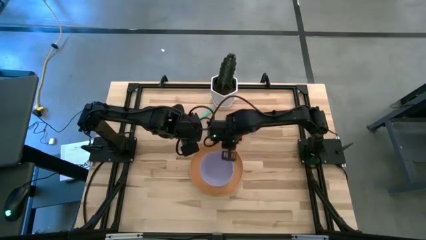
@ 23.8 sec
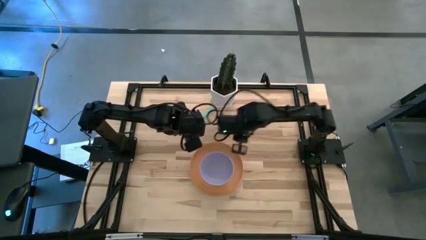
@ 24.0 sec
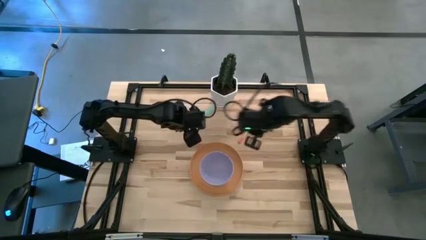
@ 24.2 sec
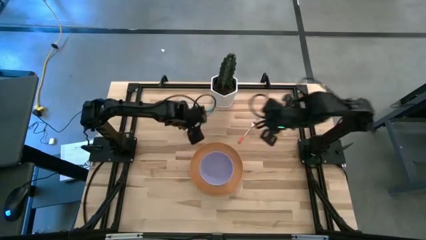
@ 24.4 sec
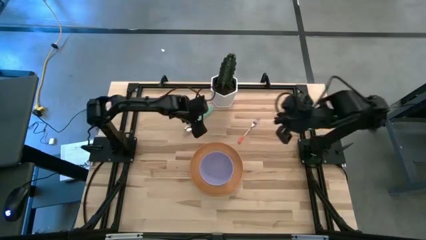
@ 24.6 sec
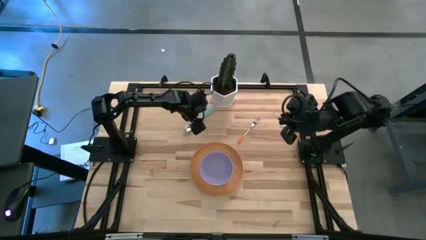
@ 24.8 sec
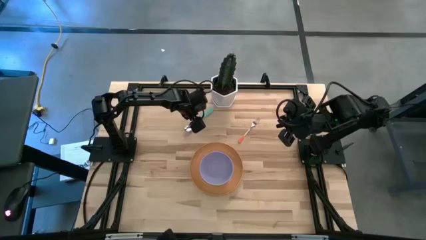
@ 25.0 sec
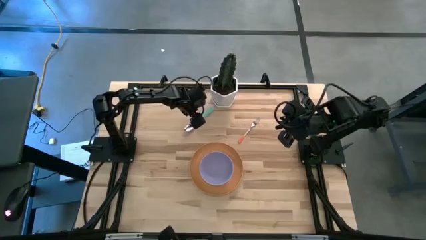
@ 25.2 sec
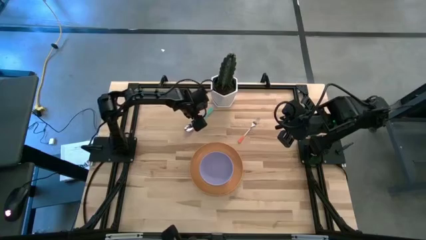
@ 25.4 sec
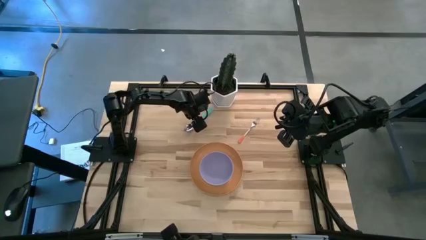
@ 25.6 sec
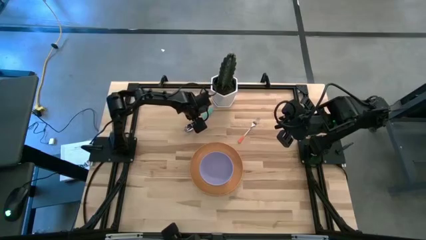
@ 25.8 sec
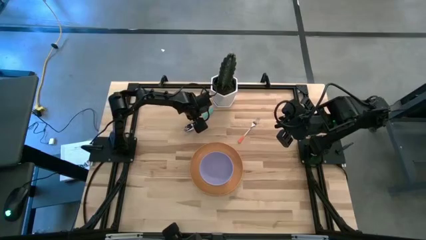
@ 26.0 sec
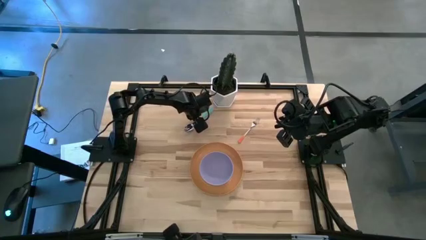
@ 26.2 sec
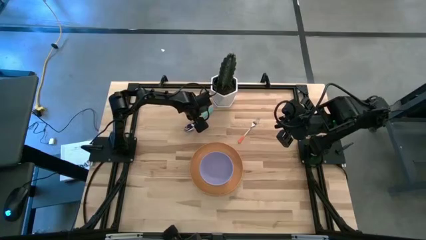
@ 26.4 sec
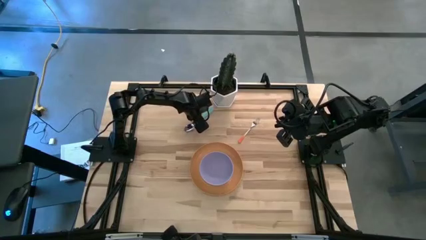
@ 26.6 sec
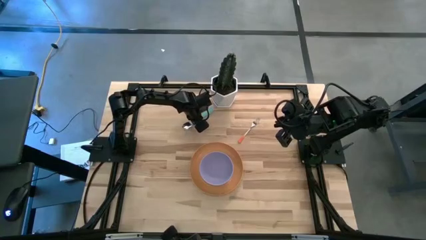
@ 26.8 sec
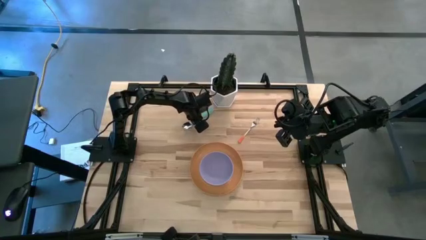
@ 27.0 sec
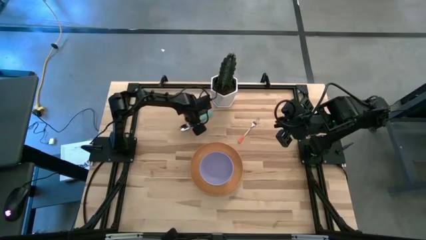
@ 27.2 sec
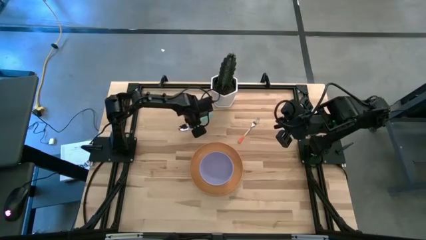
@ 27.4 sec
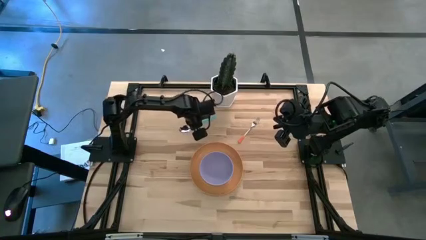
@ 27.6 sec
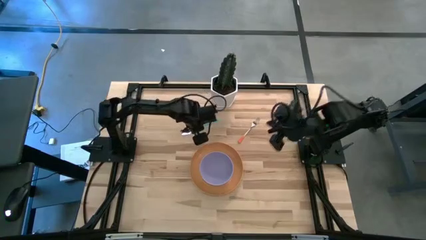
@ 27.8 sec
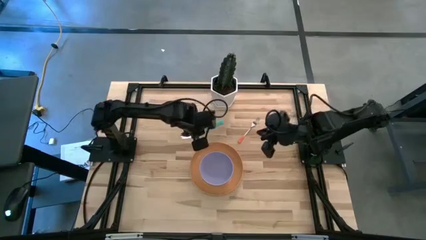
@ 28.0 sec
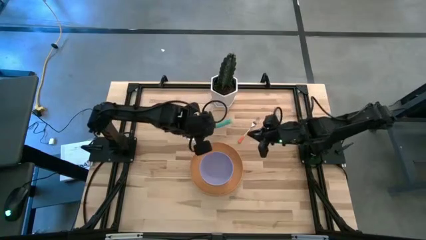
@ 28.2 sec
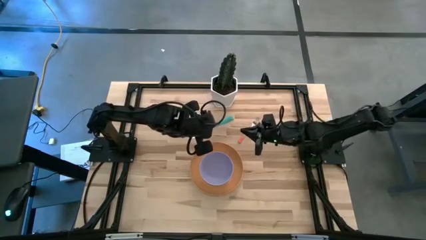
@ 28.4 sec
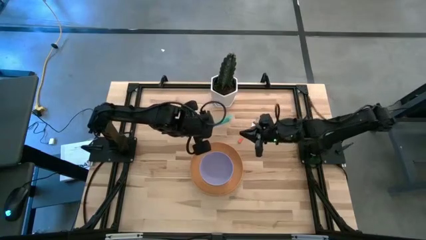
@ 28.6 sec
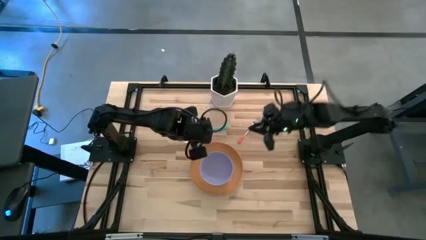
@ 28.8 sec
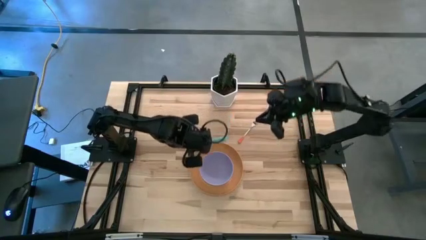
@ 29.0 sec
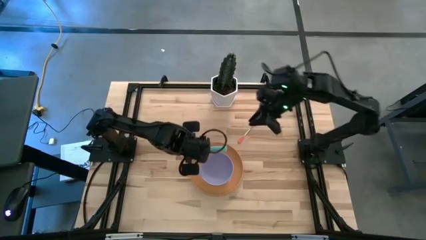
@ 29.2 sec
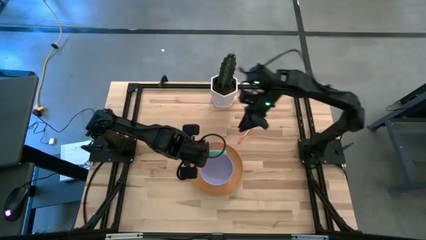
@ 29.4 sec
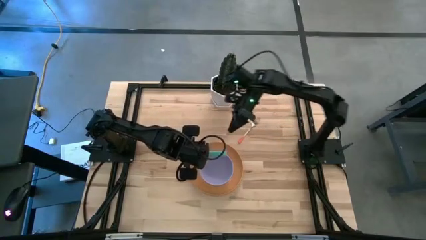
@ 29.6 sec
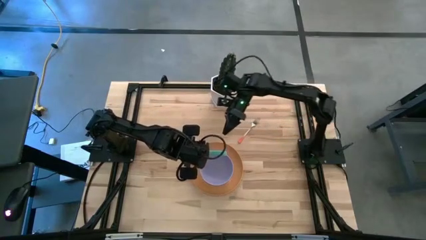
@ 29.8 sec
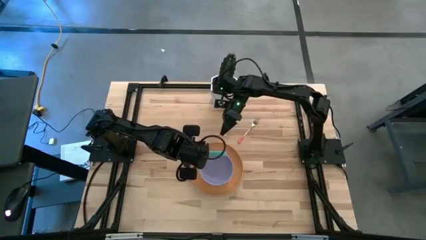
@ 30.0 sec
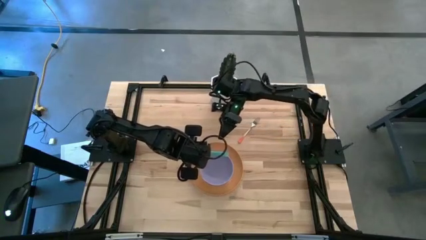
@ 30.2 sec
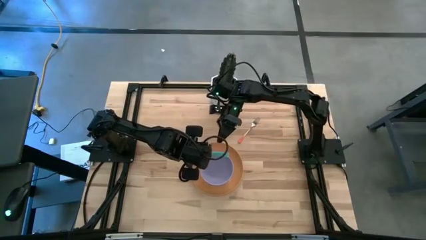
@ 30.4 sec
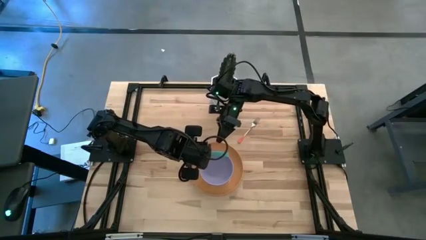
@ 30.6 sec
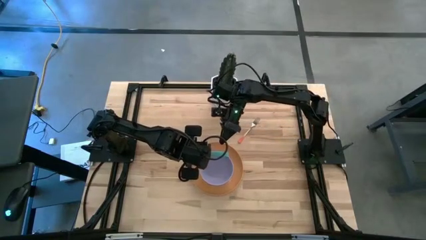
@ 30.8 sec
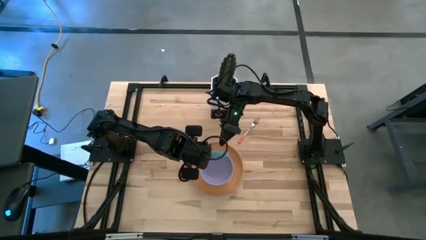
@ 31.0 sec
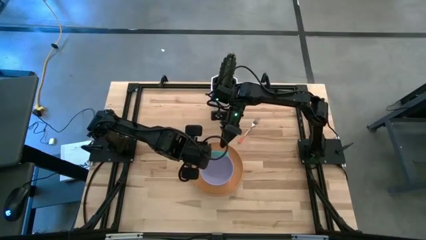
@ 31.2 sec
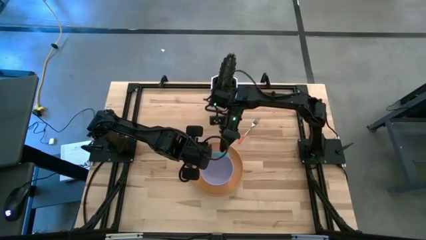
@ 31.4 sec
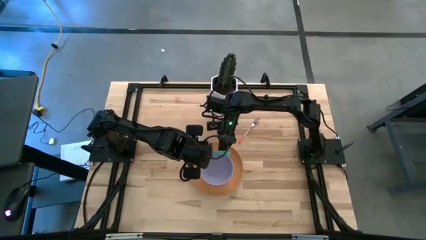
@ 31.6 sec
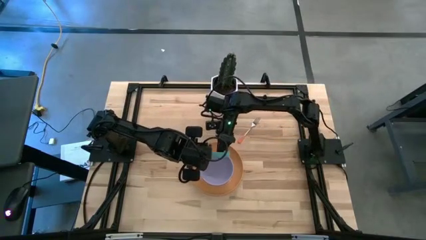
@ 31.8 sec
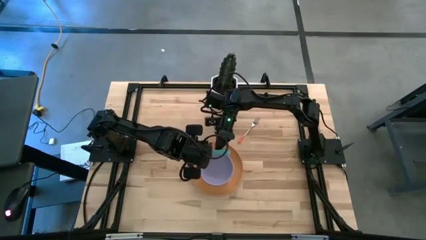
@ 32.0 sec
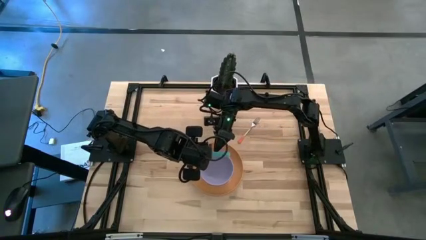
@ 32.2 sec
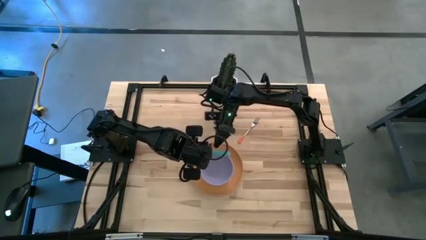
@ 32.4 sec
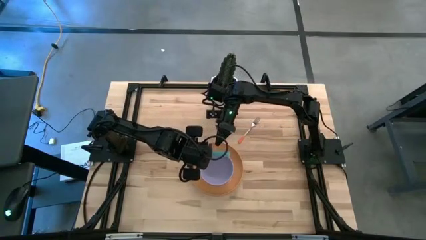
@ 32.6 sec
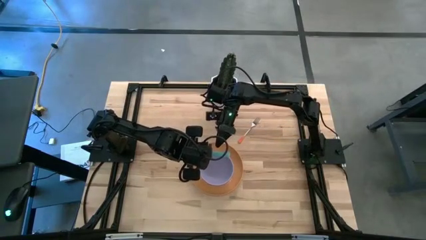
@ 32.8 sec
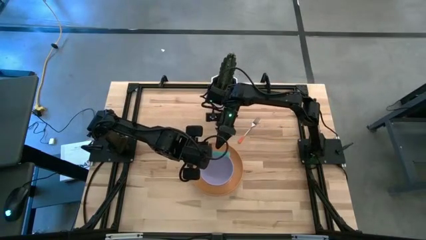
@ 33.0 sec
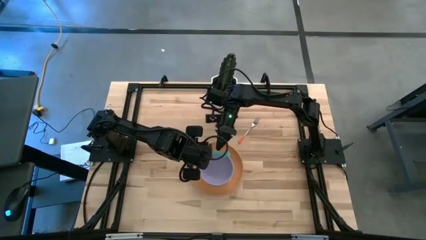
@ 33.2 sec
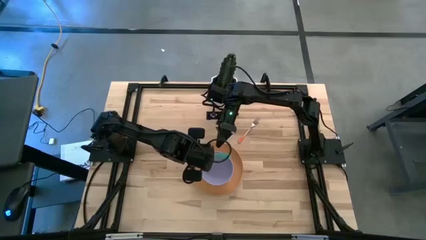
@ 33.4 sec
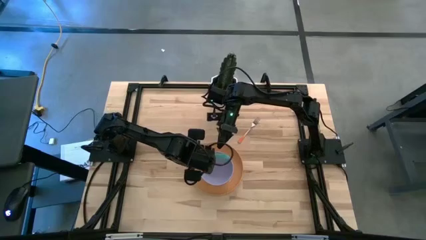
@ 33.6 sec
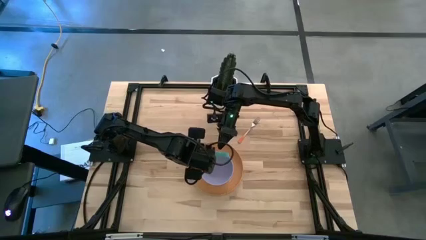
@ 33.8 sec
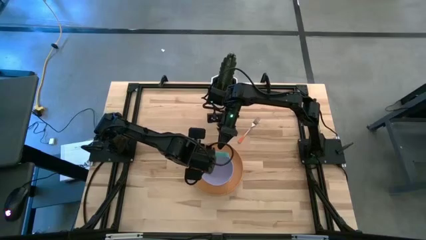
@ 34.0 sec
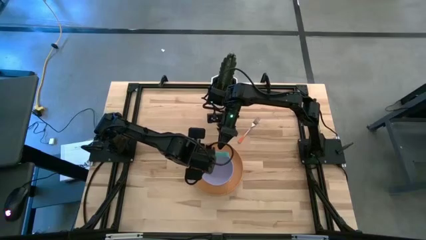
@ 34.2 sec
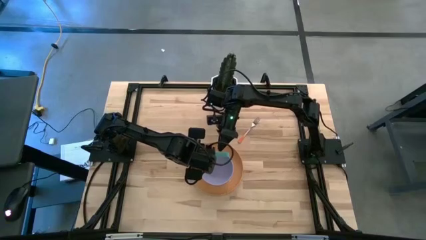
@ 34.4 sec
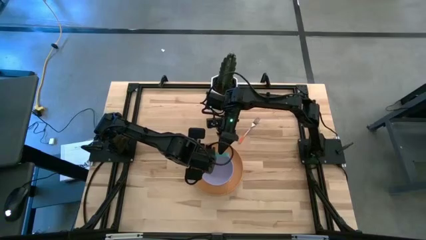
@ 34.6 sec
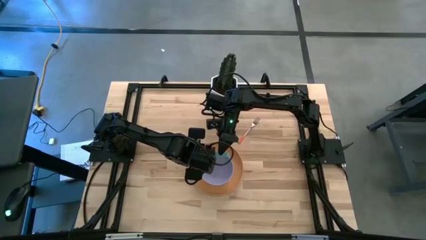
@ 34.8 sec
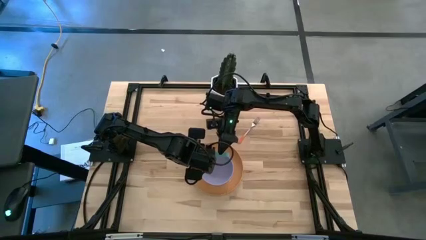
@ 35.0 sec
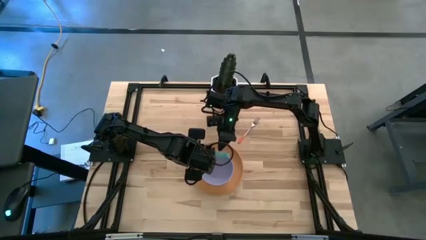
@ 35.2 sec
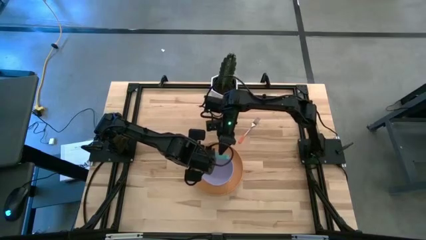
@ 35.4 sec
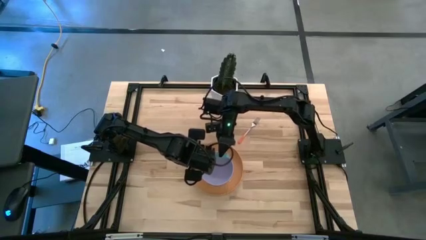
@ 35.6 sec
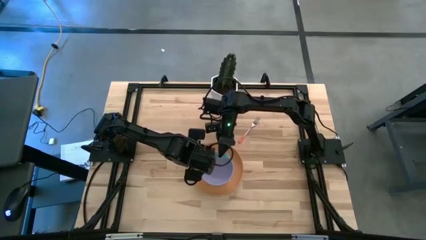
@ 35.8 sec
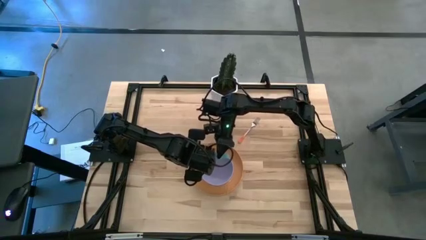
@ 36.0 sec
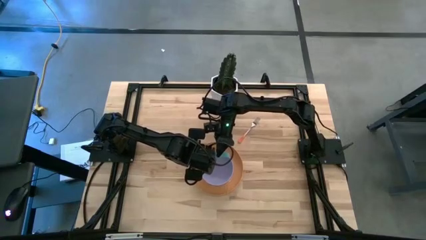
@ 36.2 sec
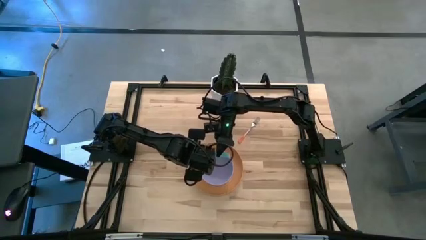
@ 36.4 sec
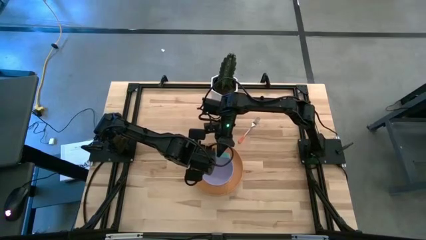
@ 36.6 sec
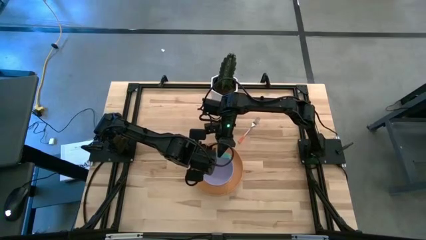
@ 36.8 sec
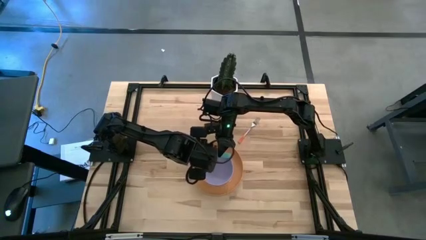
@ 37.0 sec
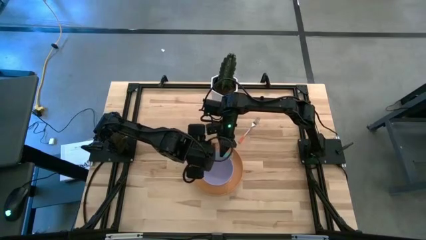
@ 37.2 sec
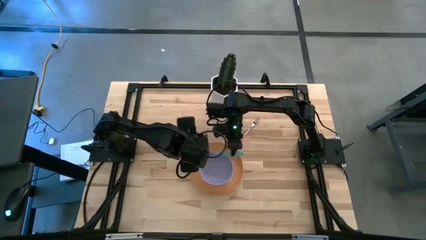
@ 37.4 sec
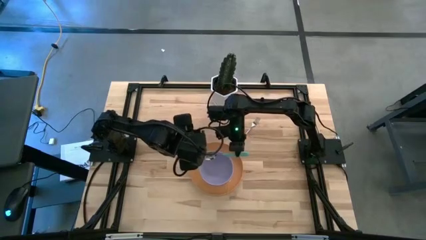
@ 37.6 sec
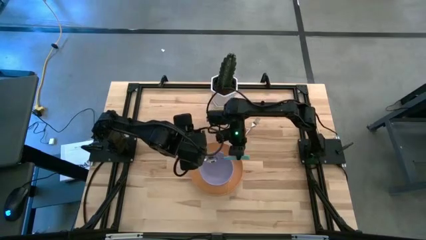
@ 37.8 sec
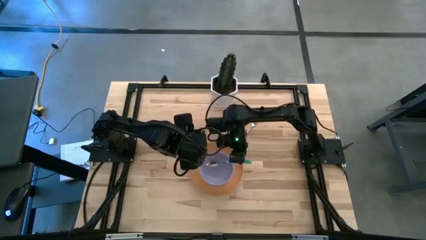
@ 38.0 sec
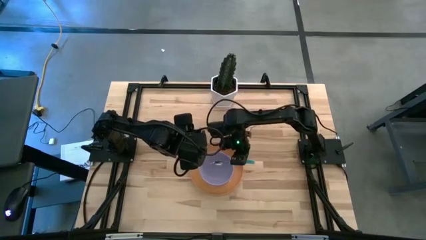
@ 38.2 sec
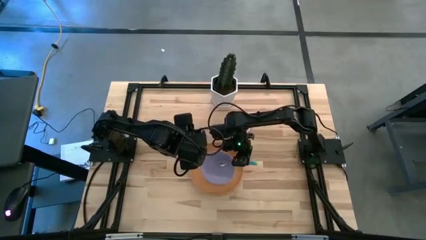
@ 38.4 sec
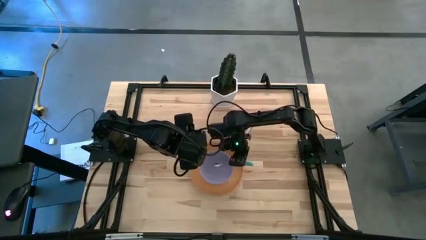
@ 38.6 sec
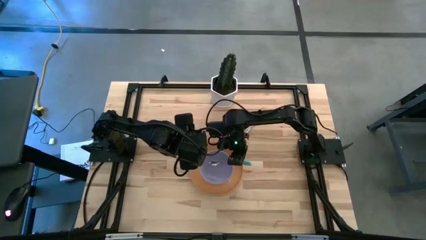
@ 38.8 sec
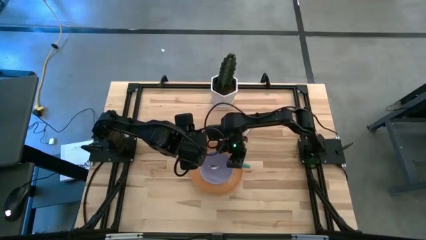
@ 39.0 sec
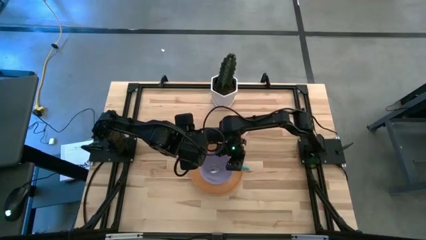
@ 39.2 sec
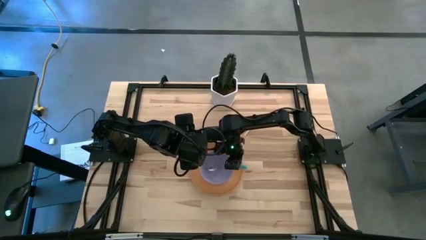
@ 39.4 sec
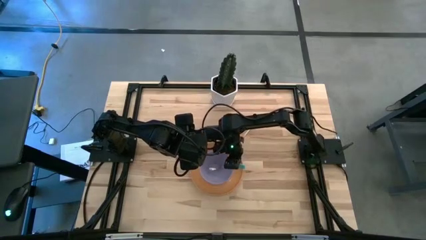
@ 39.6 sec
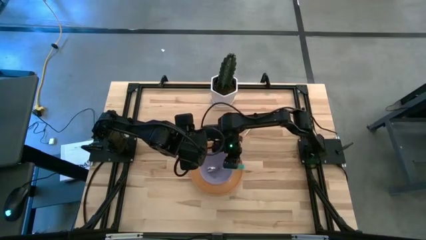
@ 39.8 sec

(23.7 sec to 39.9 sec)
Task: Set table place
Put the green spoon into the purple bowl
